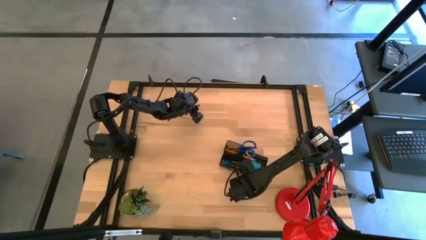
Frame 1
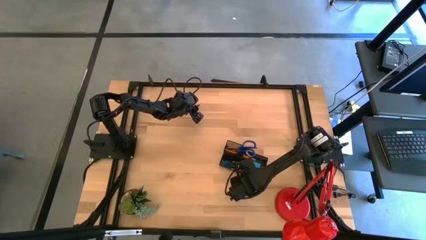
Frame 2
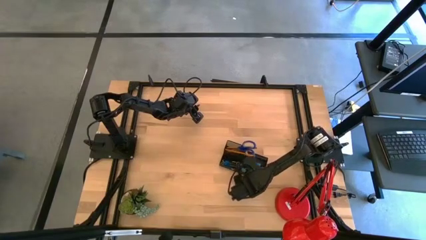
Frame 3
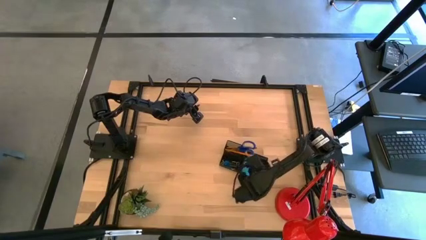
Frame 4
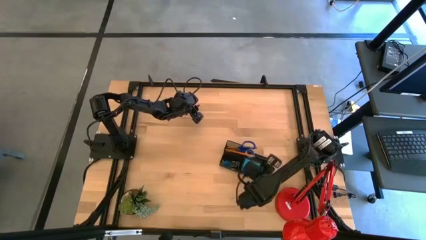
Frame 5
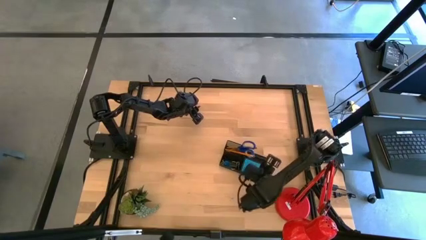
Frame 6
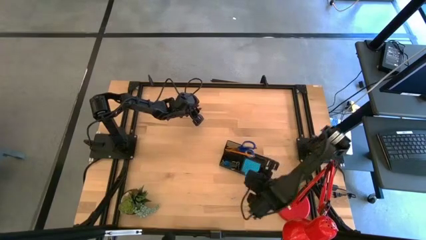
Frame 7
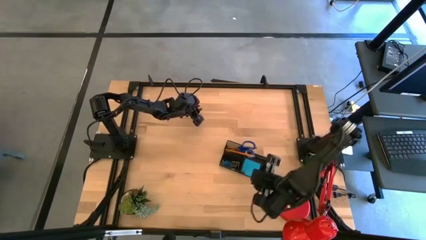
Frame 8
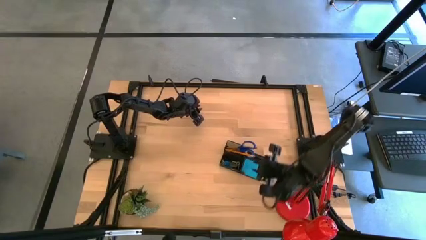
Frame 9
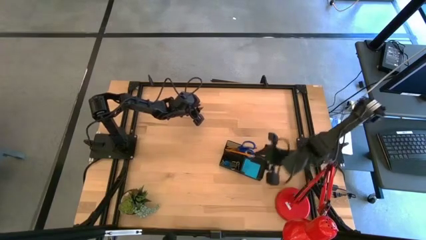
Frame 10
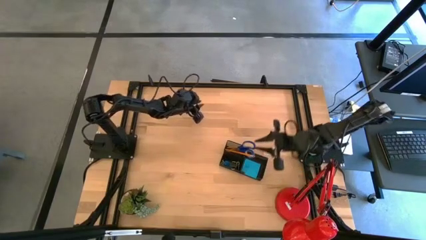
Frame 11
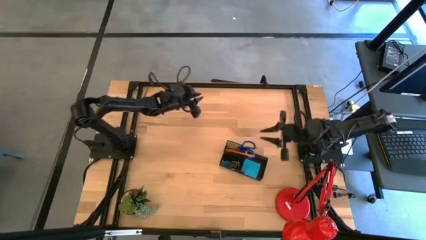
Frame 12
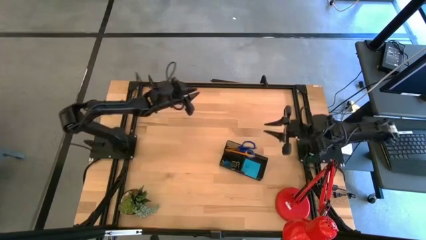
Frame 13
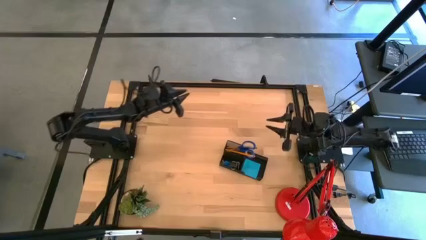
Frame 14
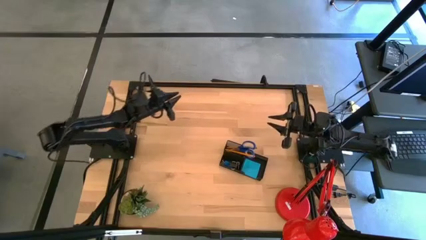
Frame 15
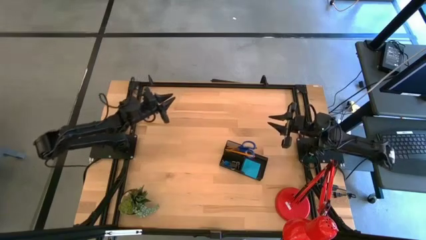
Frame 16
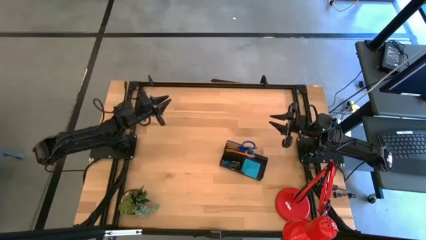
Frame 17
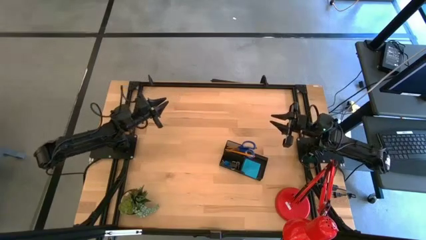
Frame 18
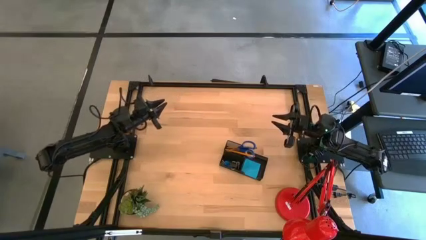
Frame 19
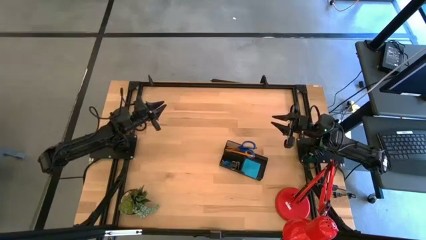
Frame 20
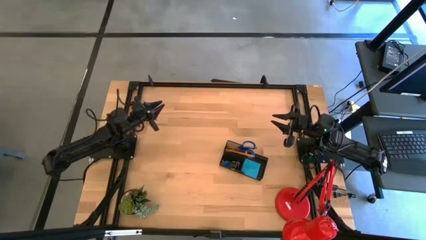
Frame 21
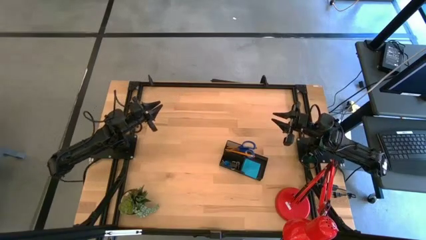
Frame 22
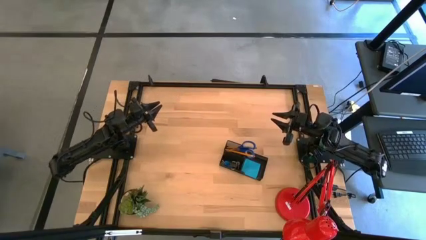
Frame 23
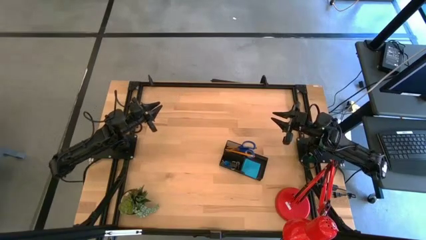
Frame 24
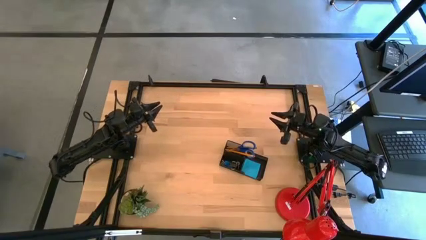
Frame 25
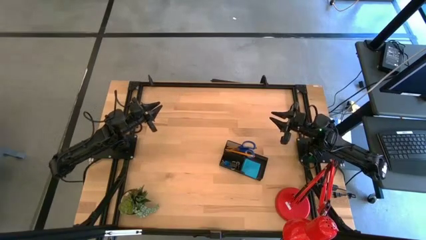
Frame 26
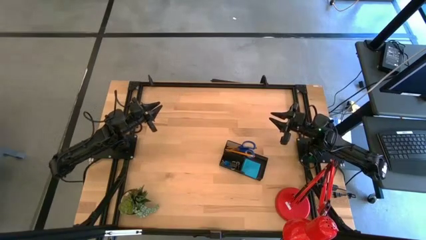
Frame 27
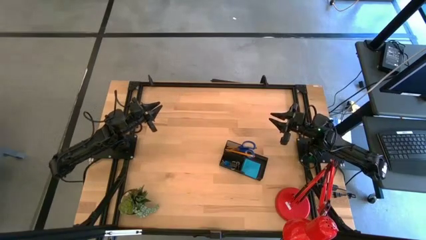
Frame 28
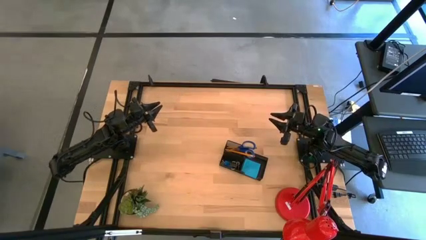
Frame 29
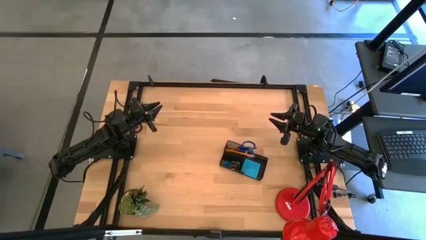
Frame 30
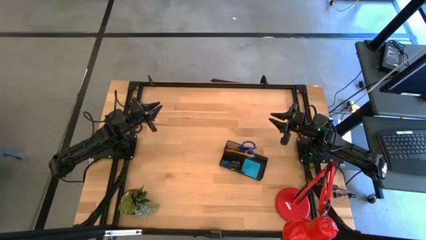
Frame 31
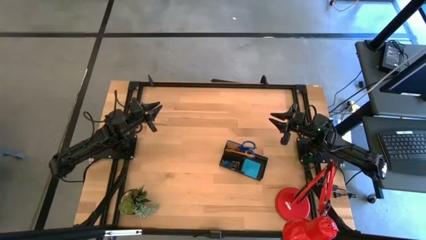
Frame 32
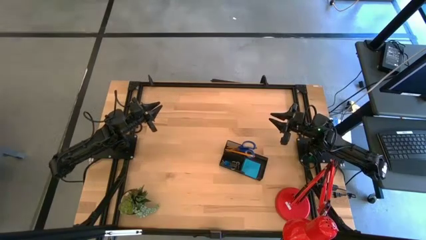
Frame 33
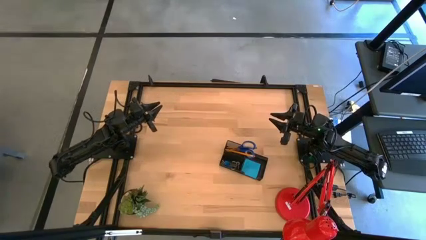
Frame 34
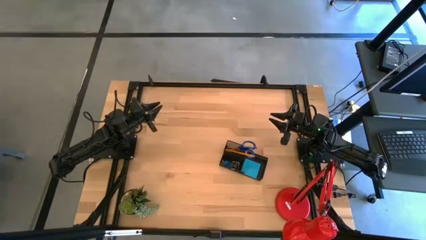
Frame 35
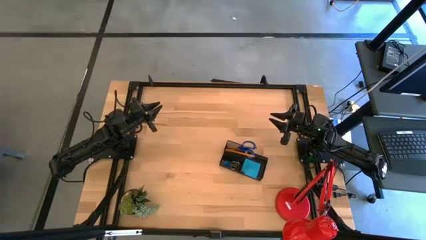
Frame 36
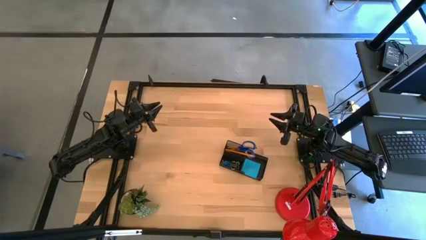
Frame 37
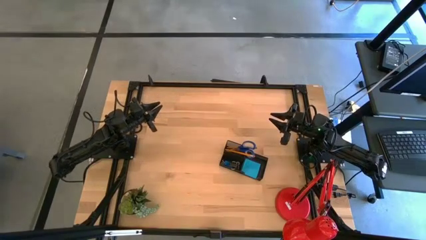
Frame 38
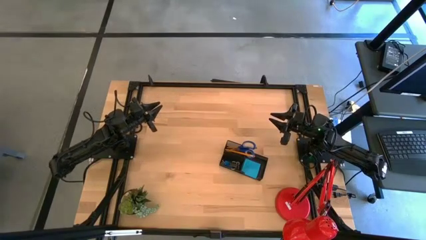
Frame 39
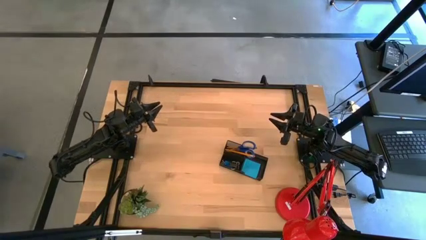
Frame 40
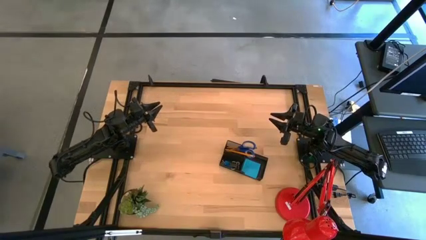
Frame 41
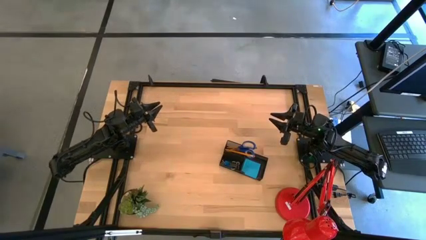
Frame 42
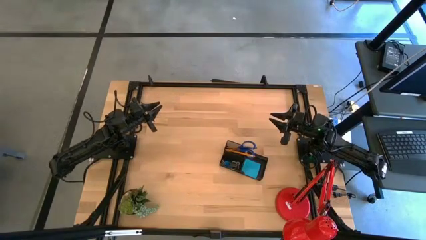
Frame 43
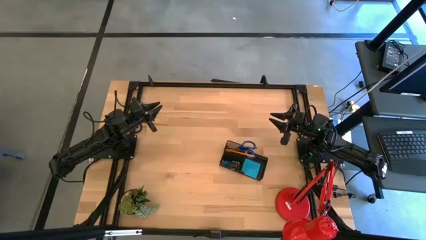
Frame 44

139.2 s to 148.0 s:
Task: Pick and place office supplies into organizer
Return to Home Position

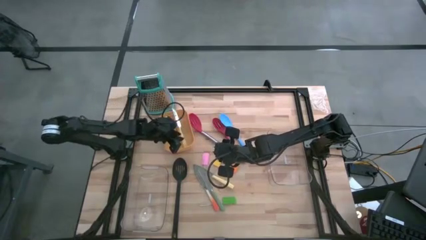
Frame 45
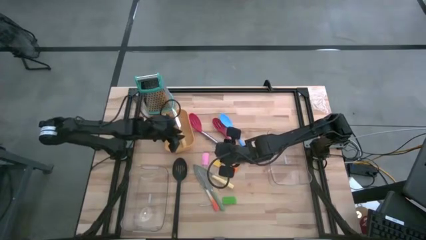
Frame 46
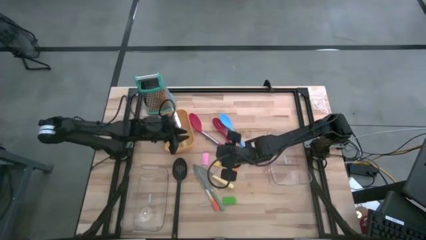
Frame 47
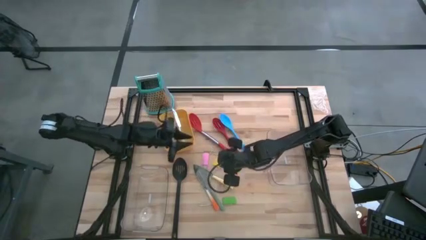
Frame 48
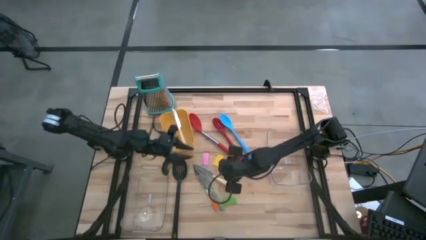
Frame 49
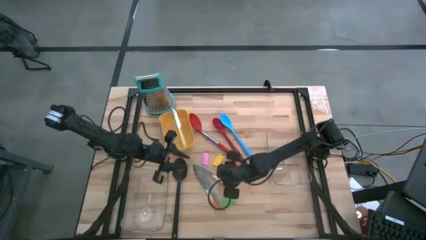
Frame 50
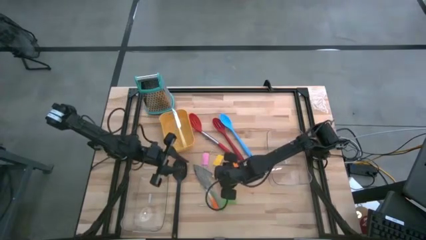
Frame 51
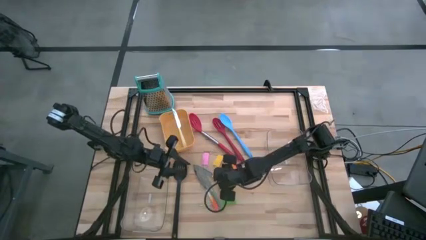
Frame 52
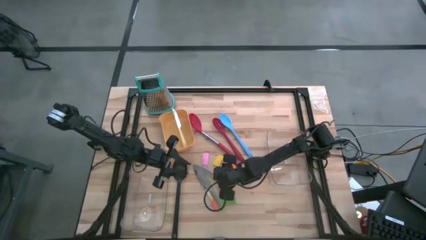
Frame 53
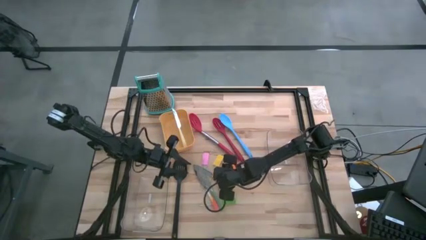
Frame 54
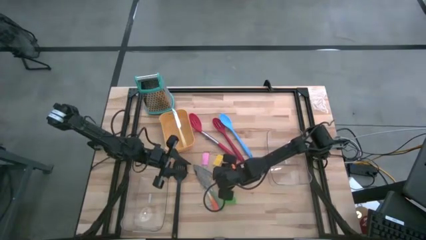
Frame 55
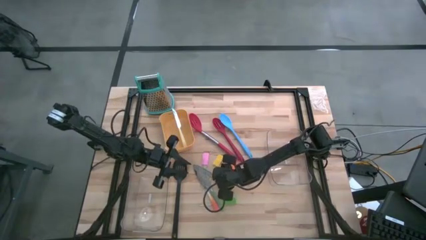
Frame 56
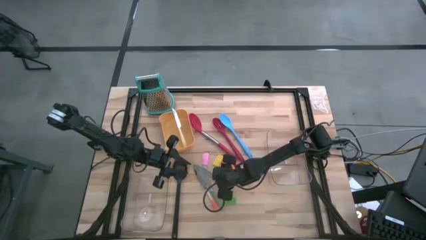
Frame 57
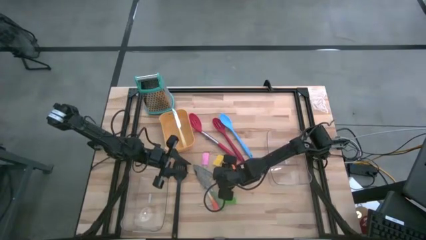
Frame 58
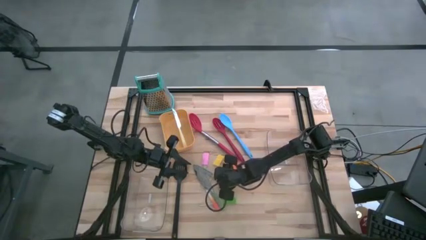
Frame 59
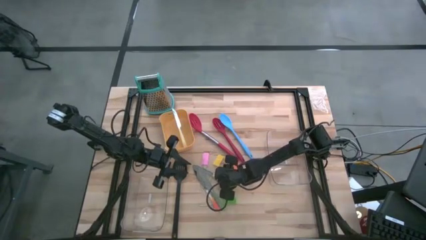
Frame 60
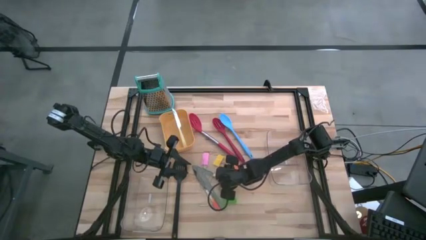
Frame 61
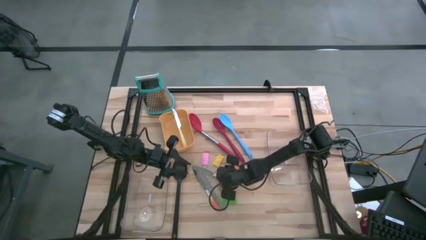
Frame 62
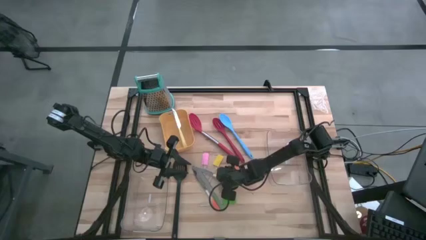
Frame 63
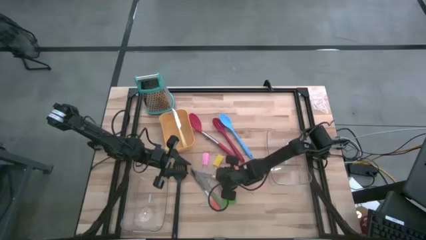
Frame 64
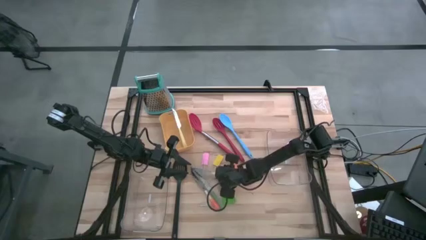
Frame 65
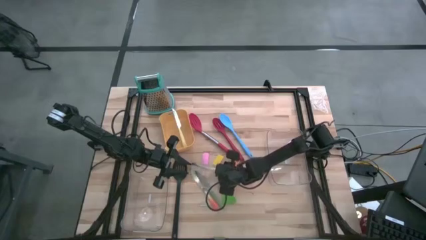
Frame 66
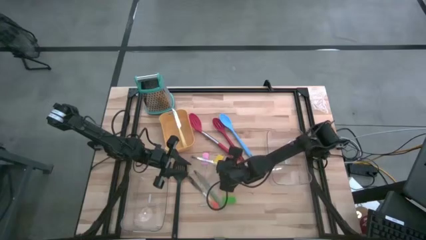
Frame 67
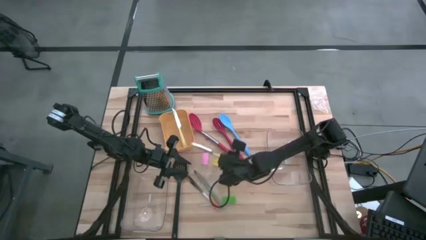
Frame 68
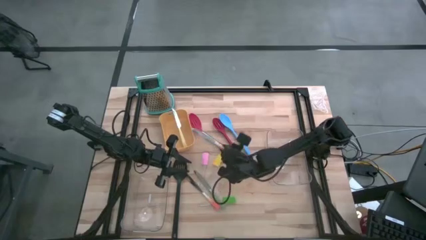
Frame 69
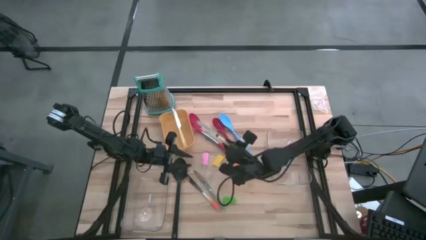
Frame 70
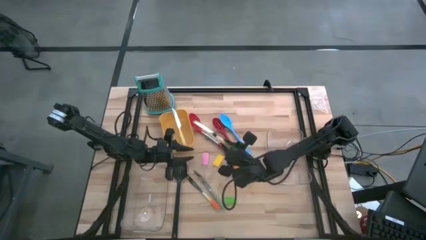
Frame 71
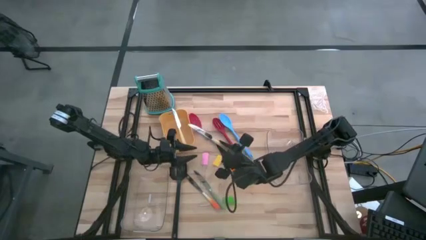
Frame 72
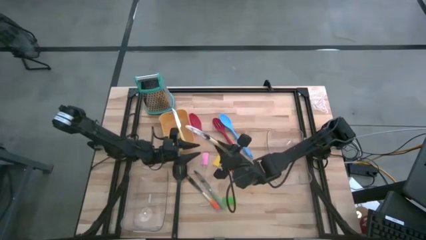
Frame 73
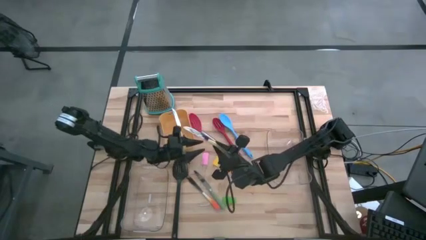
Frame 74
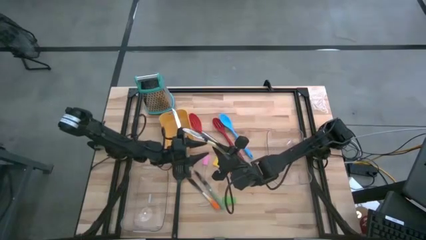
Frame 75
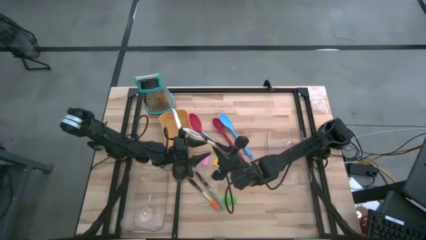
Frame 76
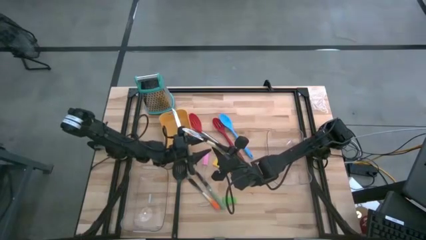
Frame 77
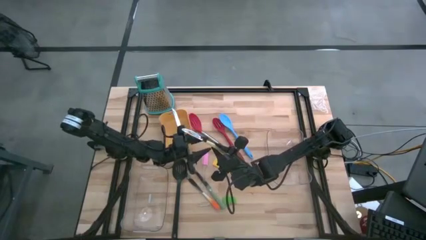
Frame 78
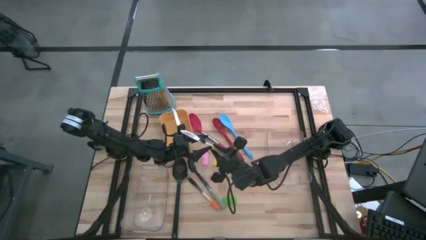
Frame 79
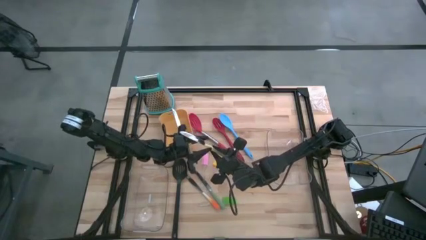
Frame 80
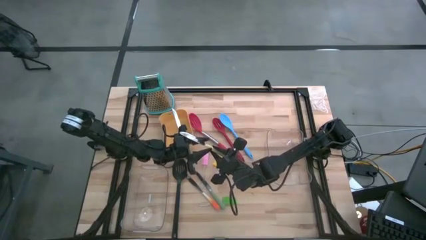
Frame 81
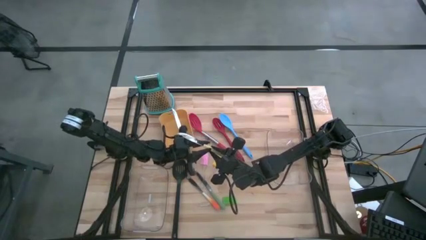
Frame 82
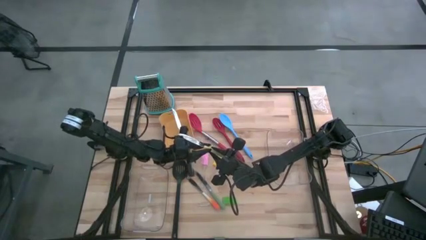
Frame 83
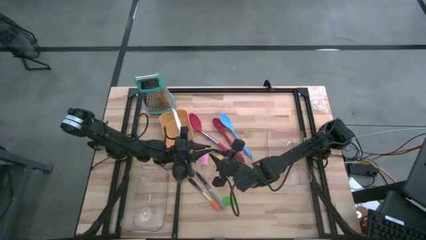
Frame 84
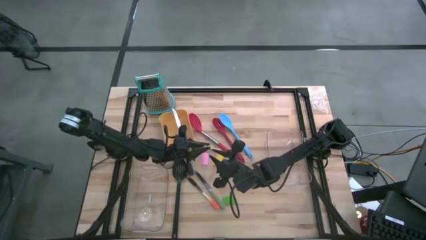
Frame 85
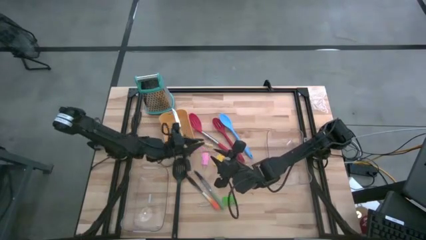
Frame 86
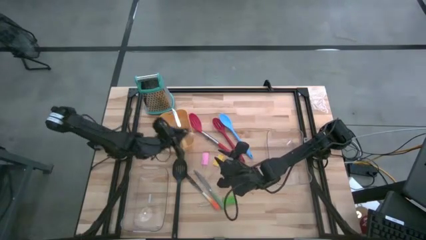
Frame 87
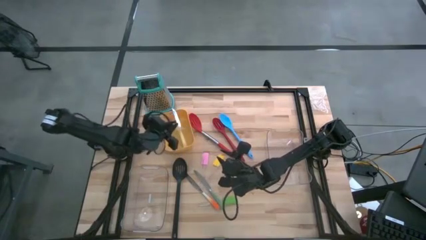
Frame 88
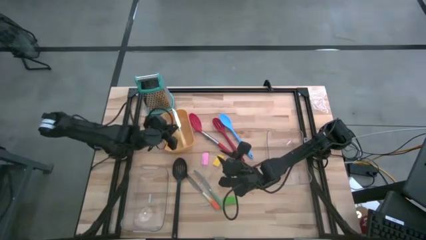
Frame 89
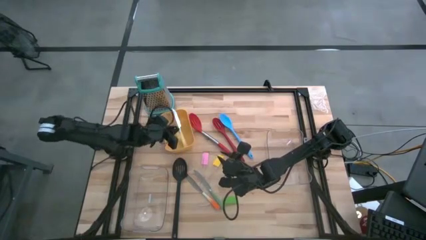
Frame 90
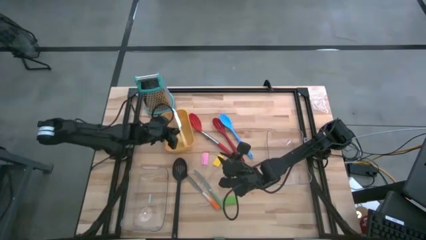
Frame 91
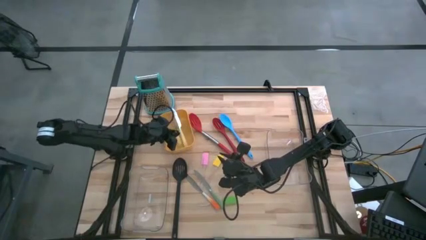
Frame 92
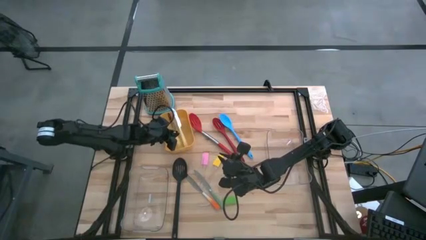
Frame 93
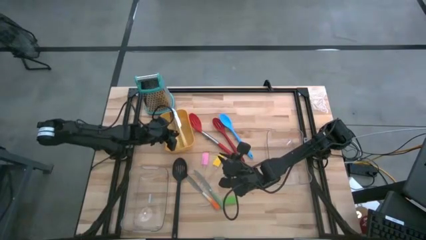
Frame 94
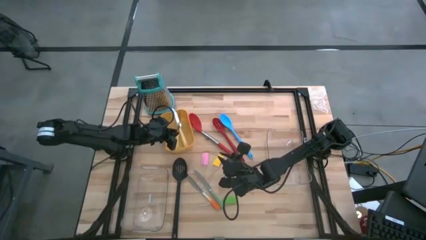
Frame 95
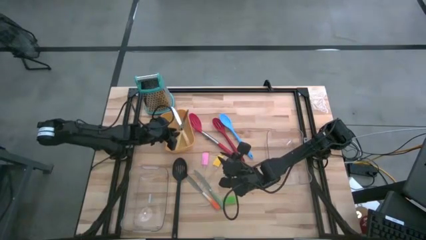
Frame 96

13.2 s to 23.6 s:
Task: Pick & Place Kitchen Items
Put the light yellow knife into the yellow bin
